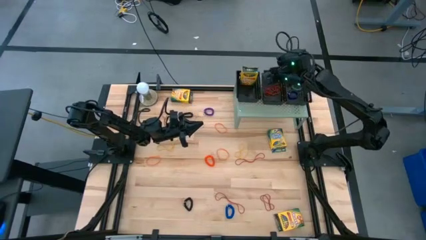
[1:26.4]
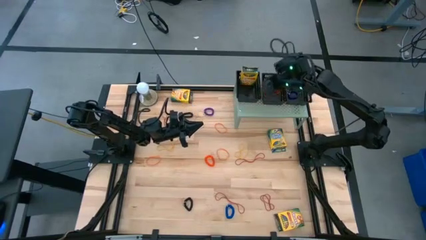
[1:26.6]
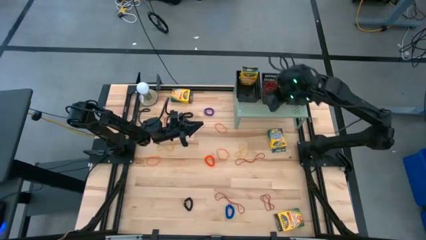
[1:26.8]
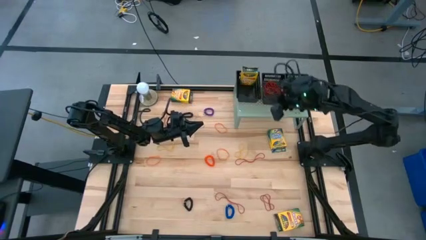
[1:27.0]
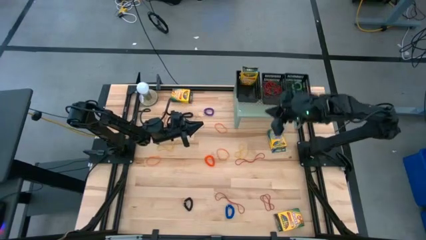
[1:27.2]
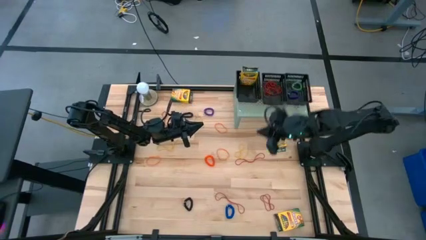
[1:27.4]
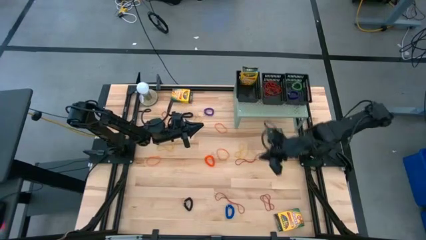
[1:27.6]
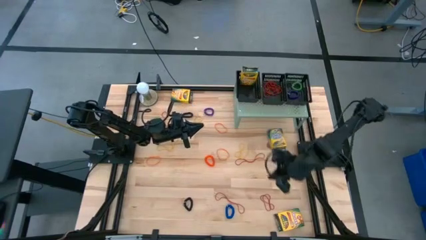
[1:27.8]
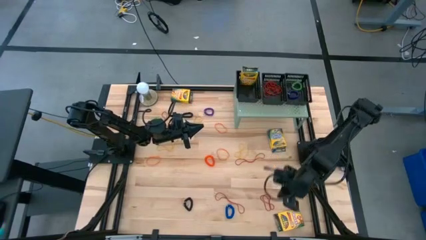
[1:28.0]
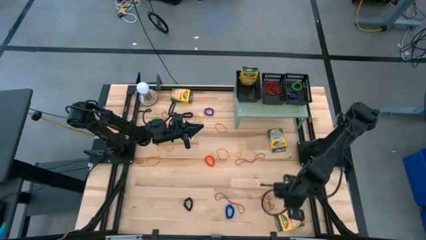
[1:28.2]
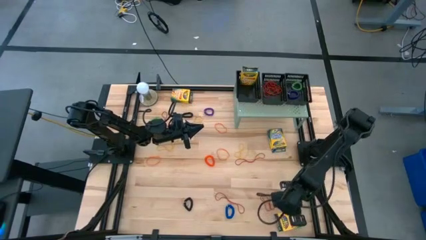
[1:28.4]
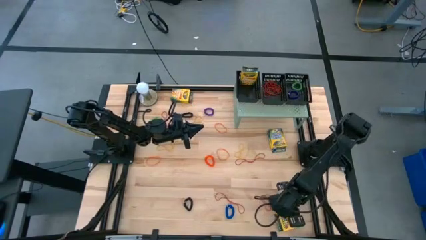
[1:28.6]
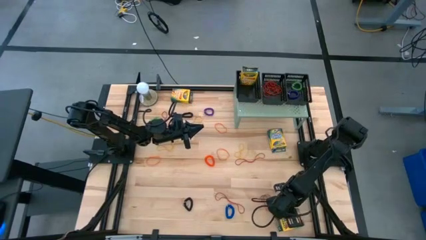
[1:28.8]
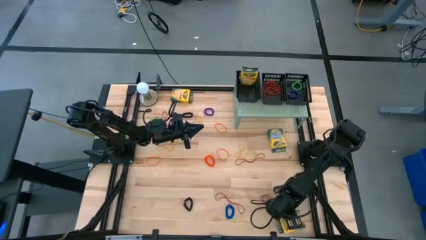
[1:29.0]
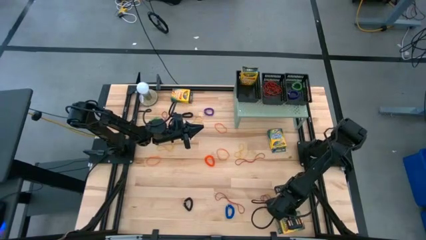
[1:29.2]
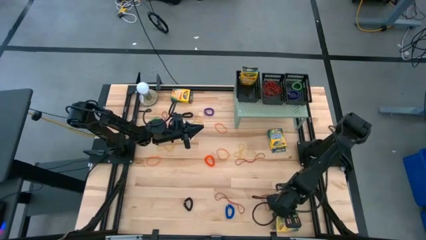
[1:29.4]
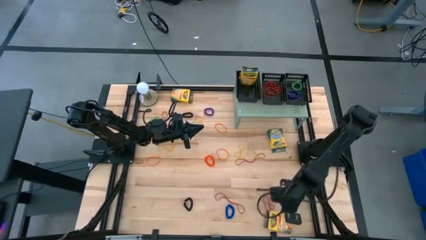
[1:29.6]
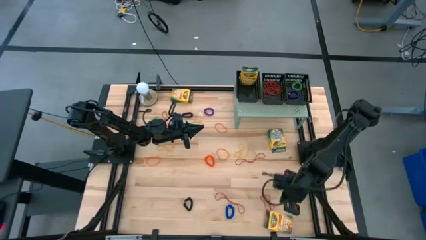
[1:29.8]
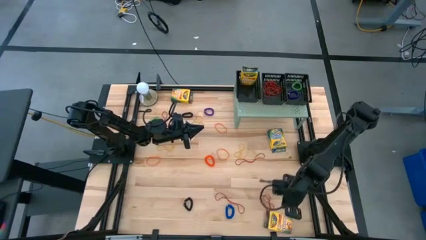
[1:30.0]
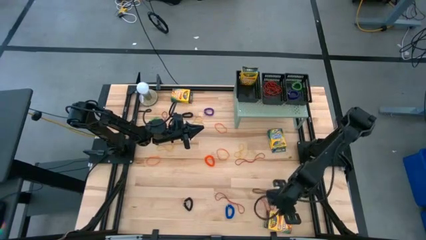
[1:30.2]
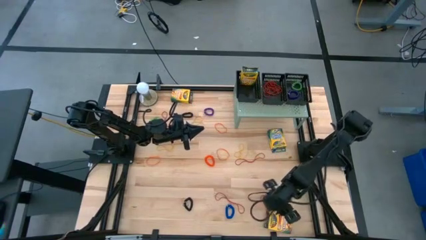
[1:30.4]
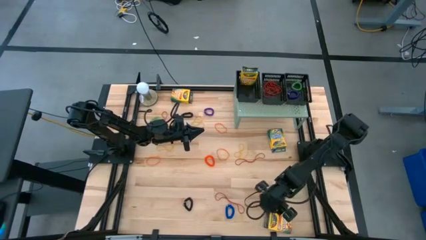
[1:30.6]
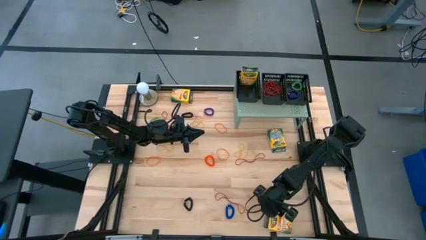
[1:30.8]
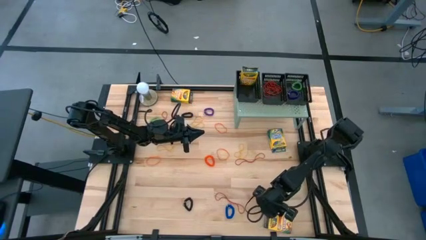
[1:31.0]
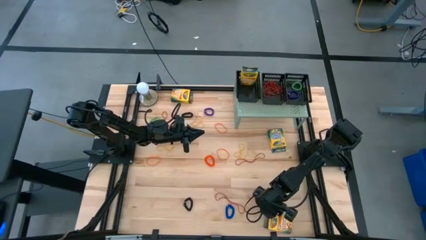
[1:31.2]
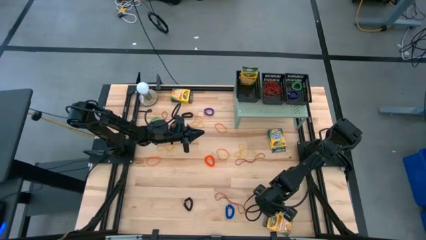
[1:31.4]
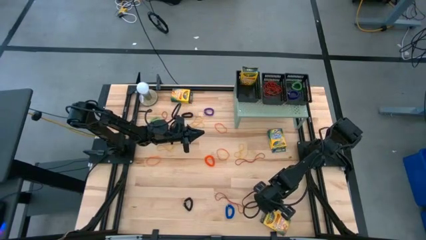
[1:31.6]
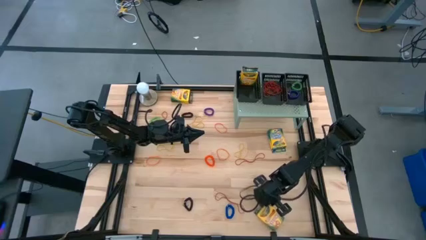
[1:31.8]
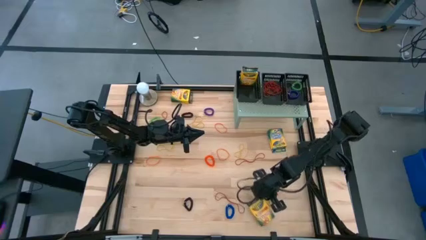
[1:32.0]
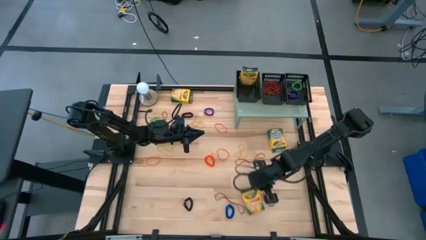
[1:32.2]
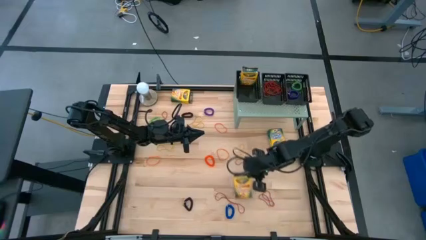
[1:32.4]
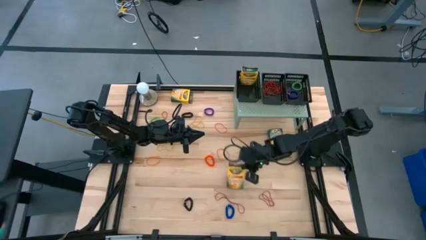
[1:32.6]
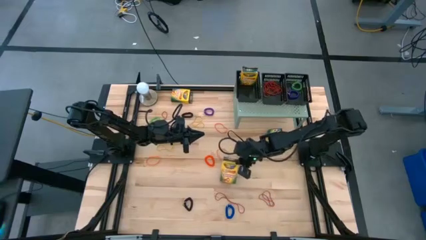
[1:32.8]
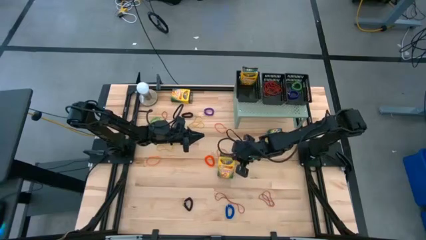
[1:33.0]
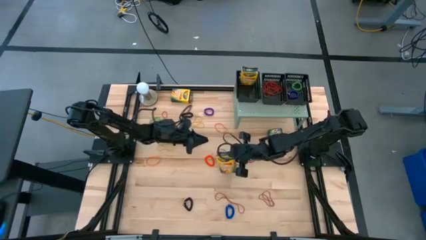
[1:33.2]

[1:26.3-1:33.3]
Task: Pick & Place Office Desk Supplies
Put the bottom yellow crayon box into the left black basket on the shelf

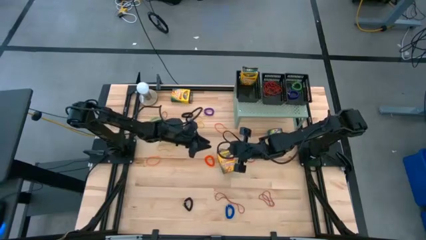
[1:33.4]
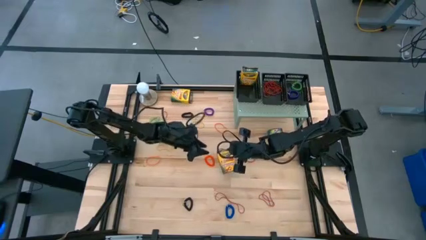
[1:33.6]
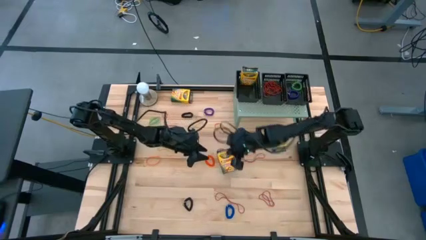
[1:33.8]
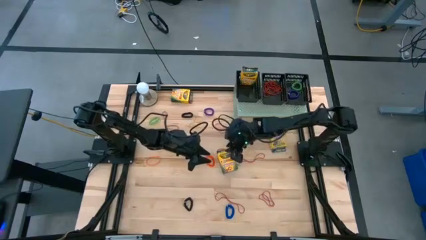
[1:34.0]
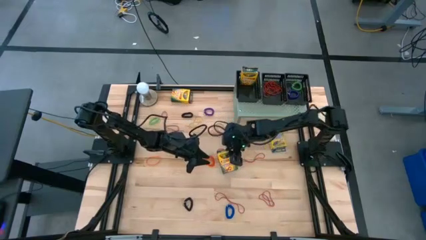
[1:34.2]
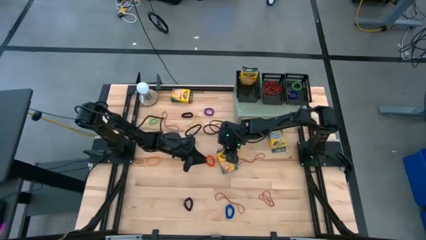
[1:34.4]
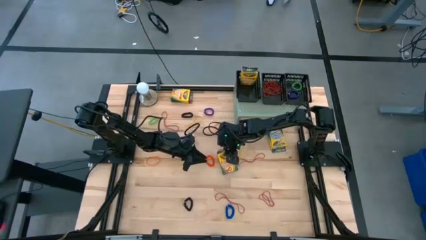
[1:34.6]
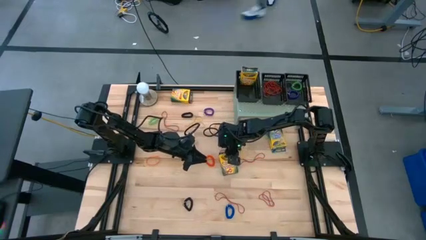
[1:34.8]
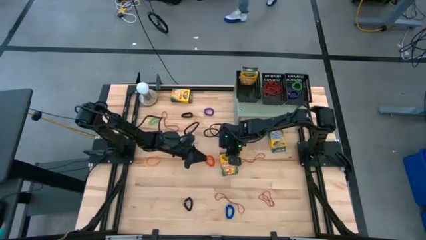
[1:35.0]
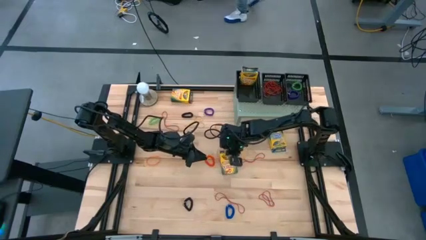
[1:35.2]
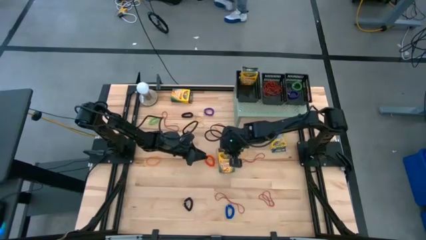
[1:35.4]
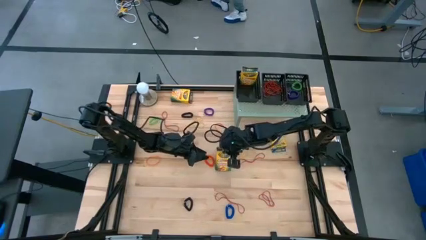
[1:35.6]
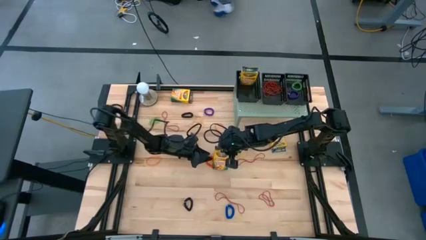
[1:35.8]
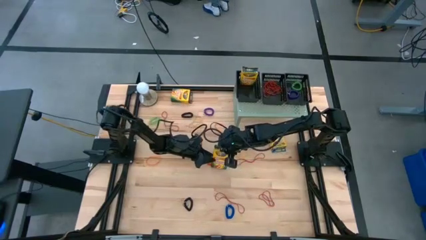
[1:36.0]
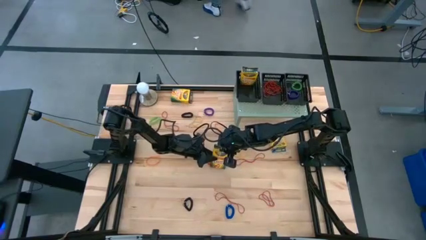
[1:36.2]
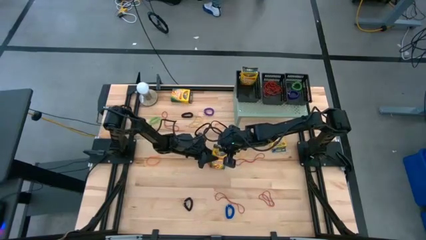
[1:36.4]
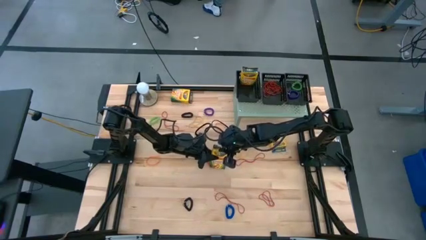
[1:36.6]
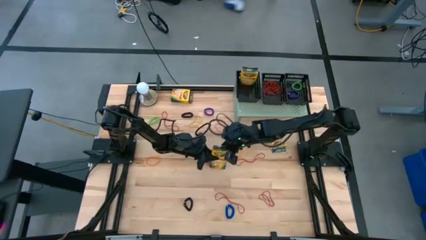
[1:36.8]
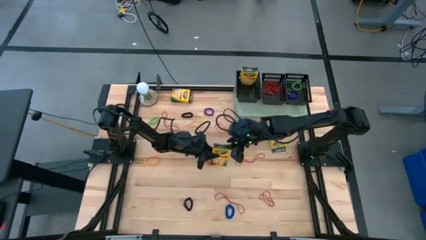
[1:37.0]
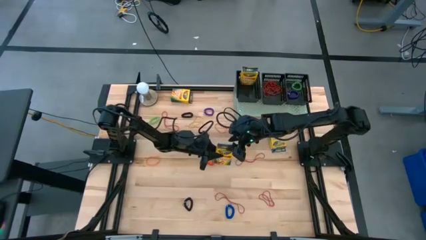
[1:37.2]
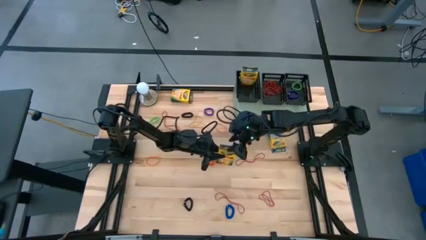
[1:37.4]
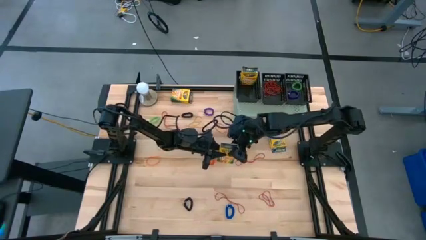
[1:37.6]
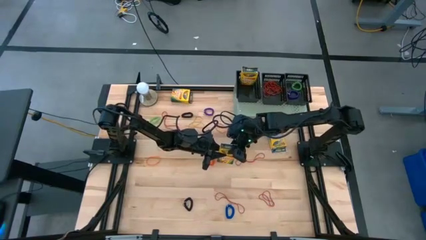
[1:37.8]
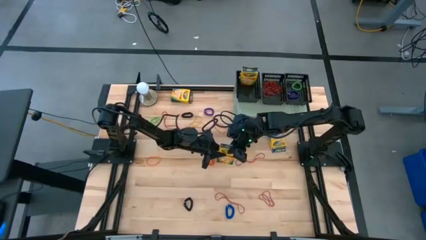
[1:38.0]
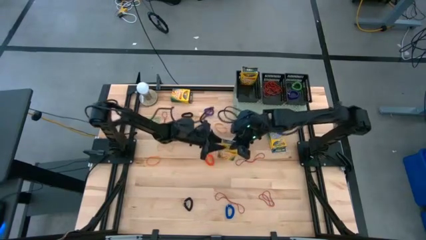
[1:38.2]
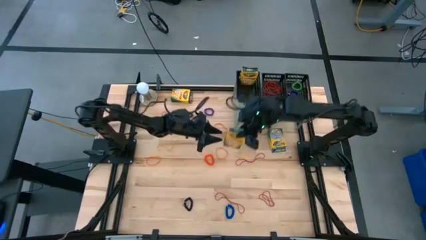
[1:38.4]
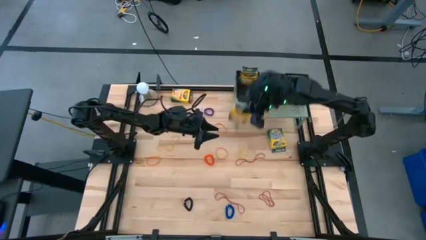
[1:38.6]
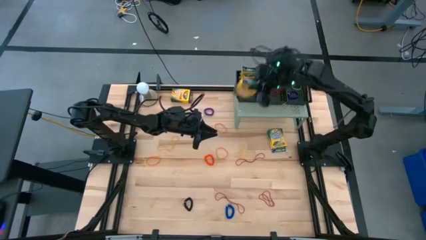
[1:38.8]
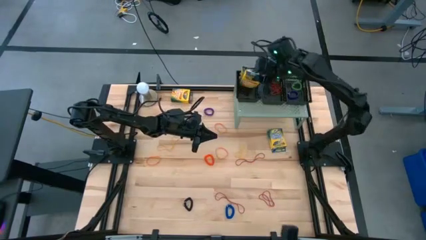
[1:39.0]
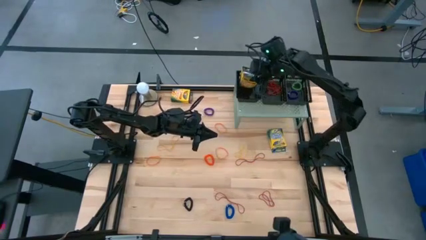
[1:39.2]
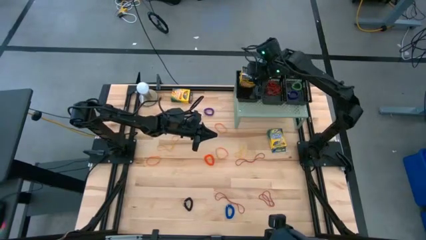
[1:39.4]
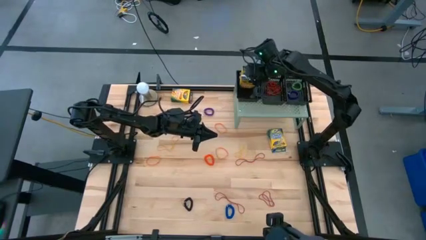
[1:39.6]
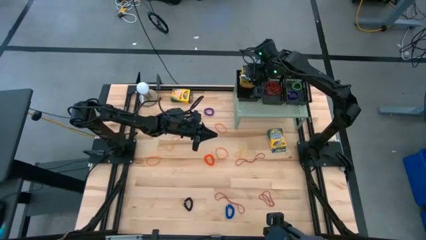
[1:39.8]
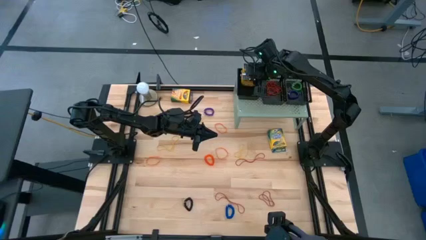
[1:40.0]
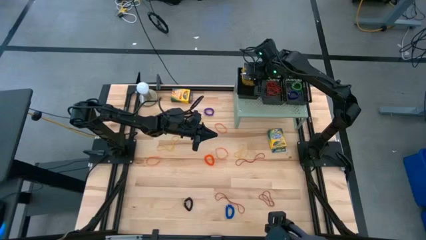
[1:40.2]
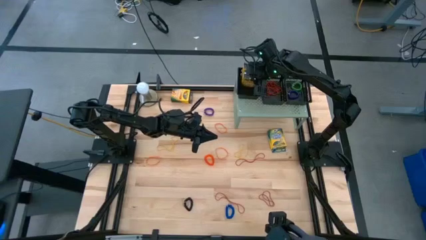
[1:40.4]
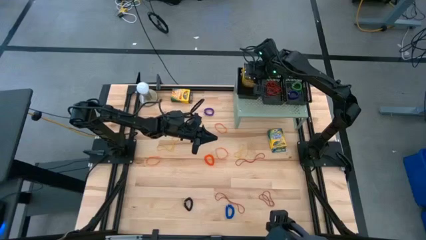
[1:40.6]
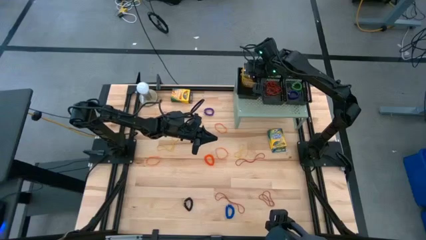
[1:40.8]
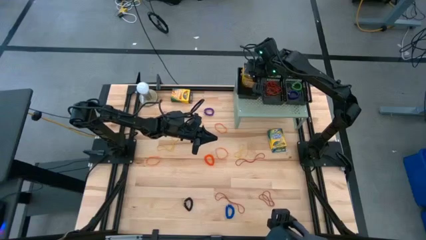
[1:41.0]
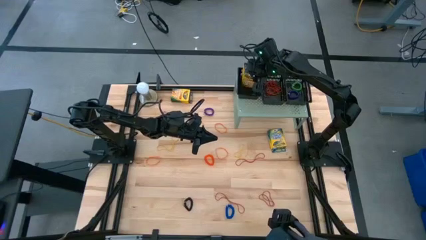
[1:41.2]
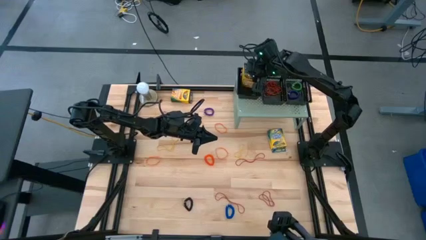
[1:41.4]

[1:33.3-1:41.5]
Put the bottom yellow crayon box into the left black basket on the shelf
